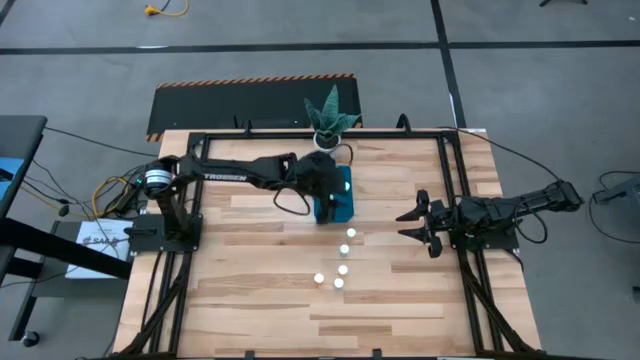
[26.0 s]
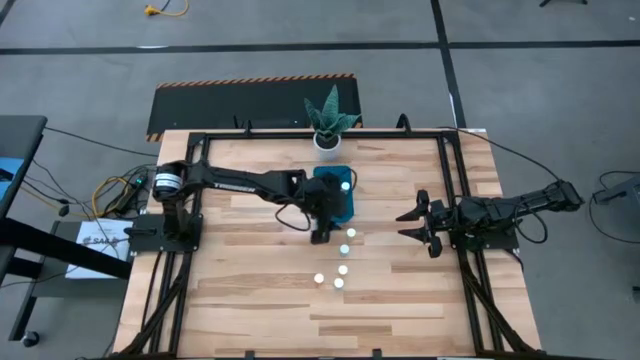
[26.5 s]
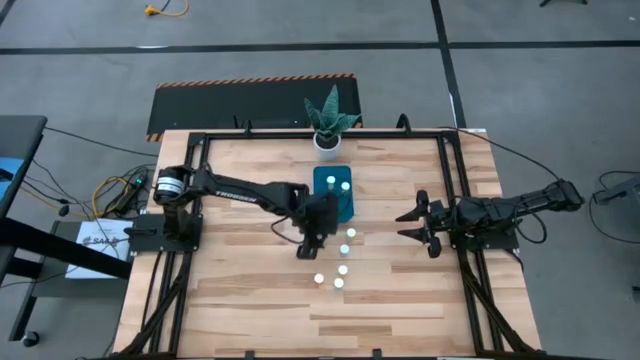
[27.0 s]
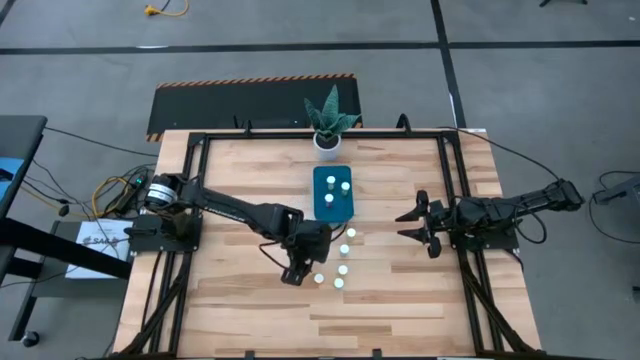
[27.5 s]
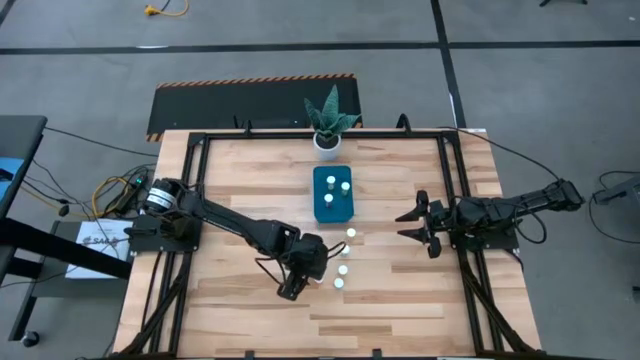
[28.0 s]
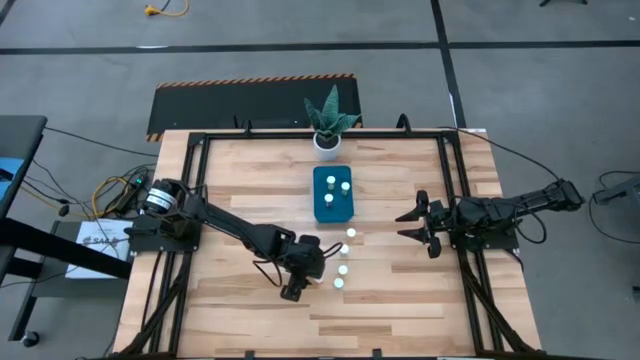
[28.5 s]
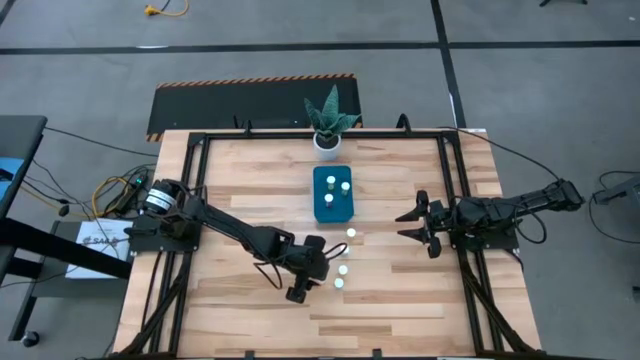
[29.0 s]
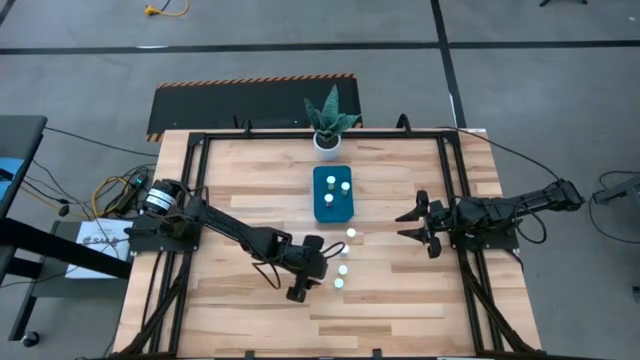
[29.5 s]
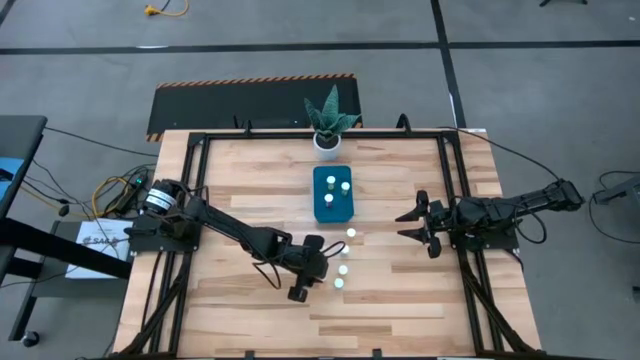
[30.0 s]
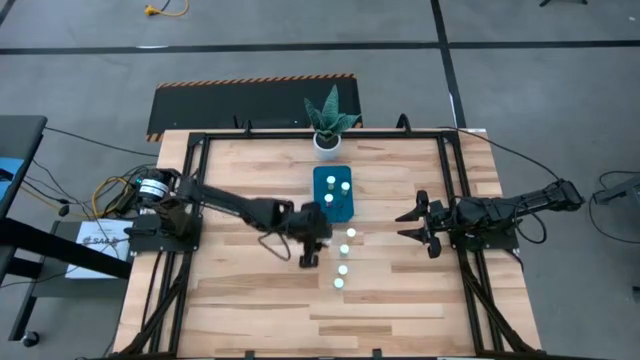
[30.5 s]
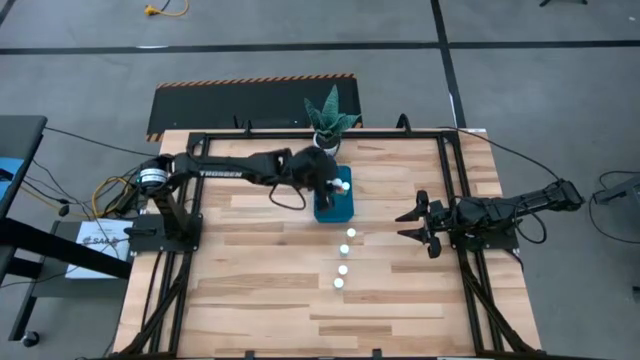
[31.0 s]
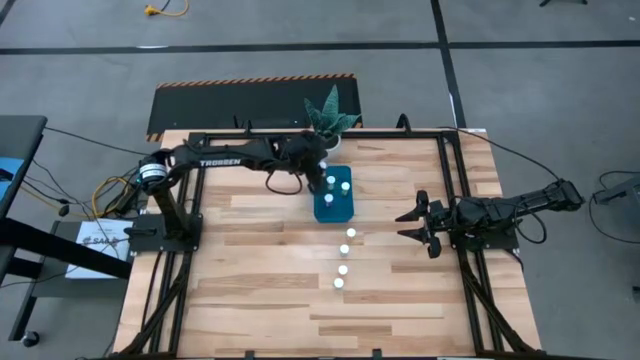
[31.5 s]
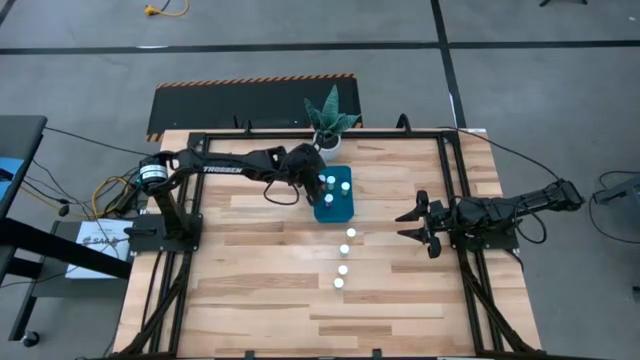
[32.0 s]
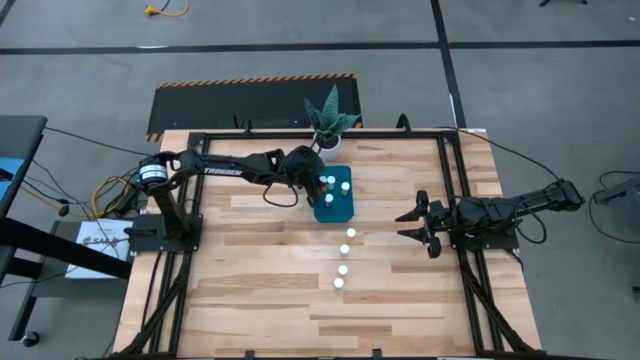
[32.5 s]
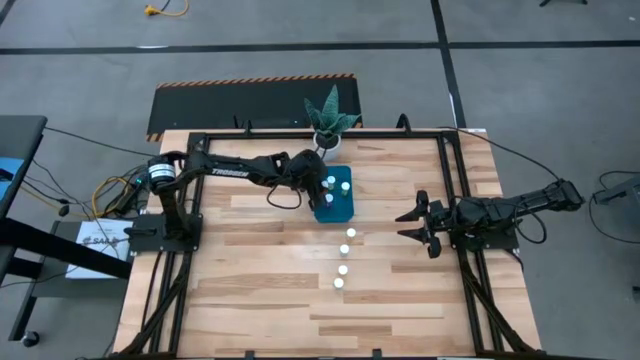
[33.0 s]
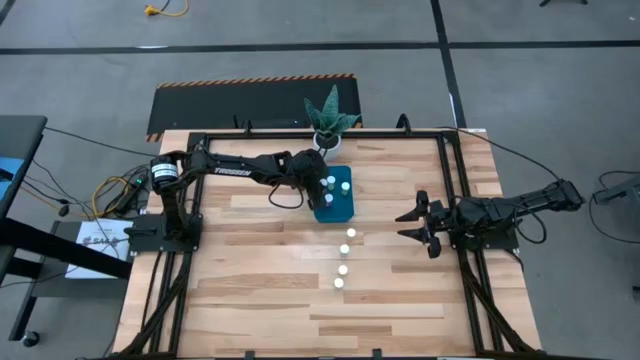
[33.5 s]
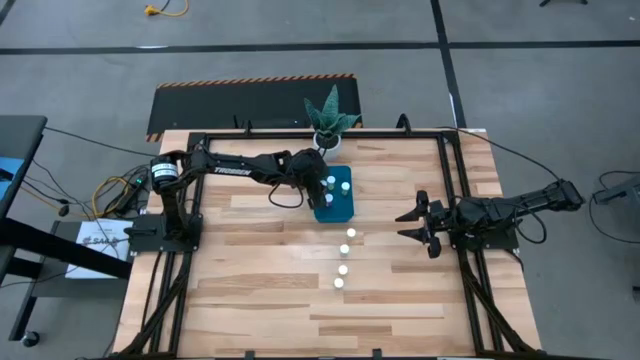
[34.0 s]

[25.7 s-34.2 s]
Task: Pick and place pill bottles into a basket
Put the orange pill bottle into the blue bin

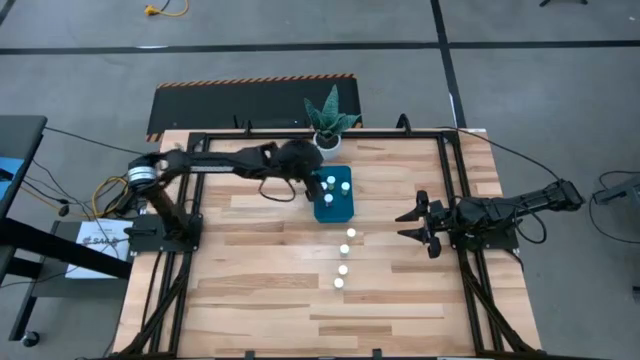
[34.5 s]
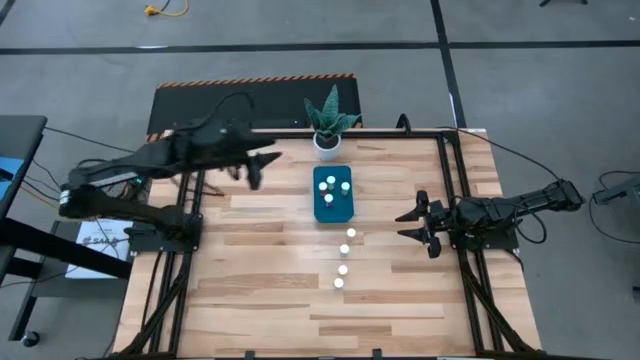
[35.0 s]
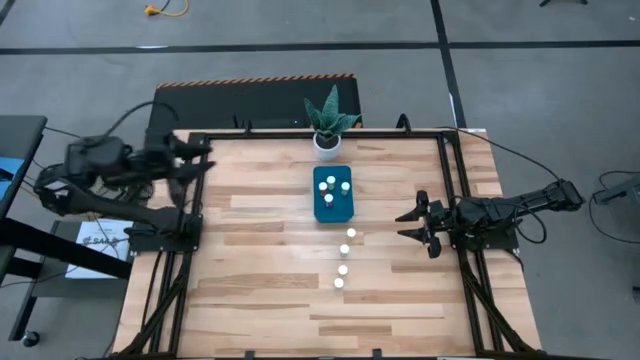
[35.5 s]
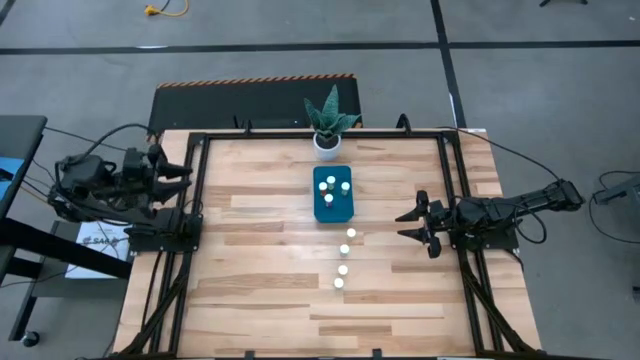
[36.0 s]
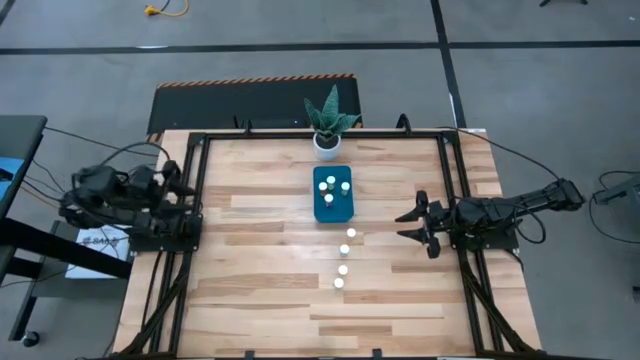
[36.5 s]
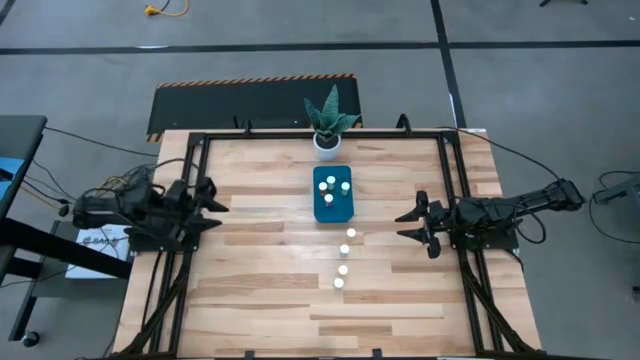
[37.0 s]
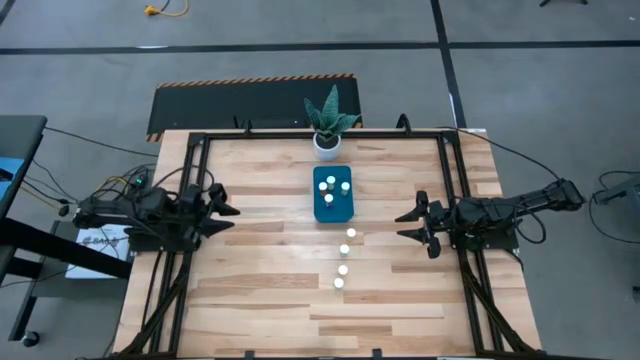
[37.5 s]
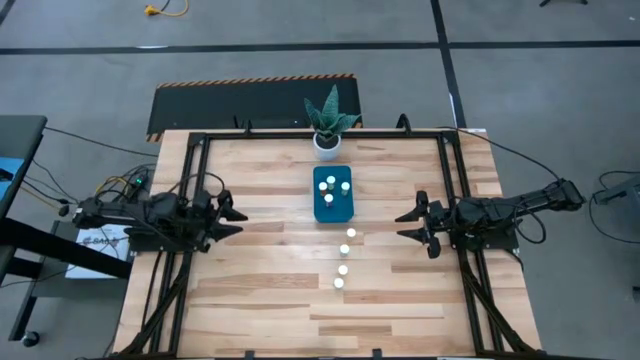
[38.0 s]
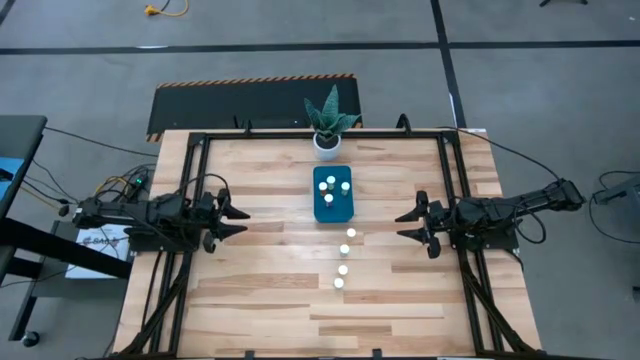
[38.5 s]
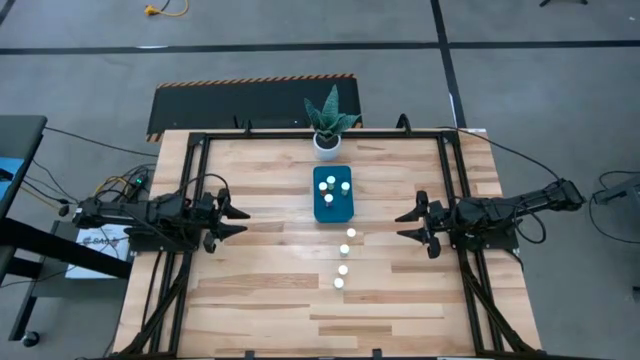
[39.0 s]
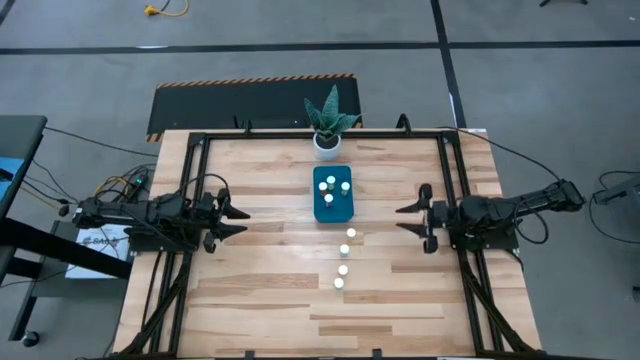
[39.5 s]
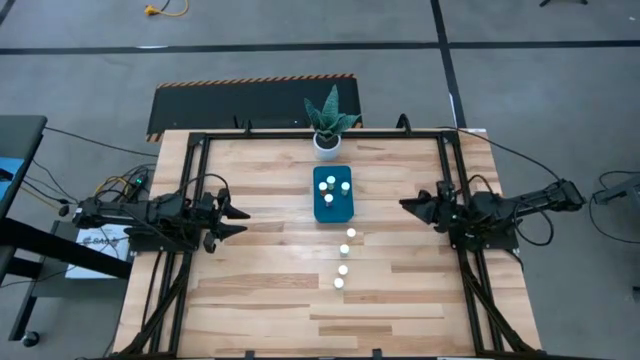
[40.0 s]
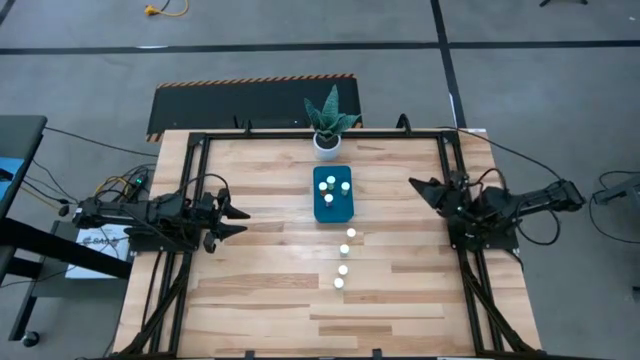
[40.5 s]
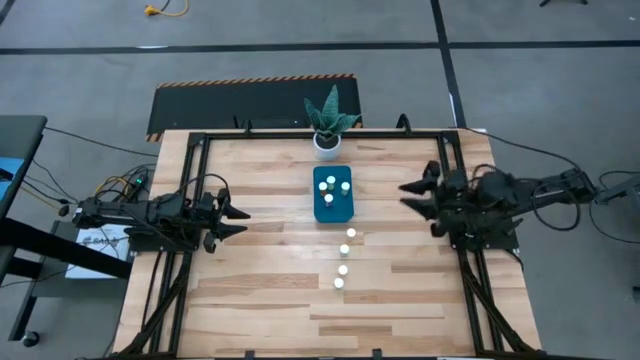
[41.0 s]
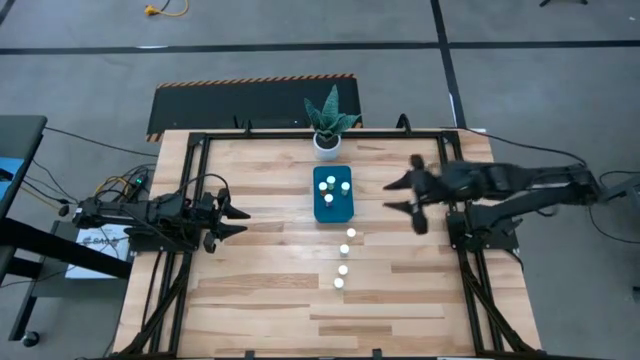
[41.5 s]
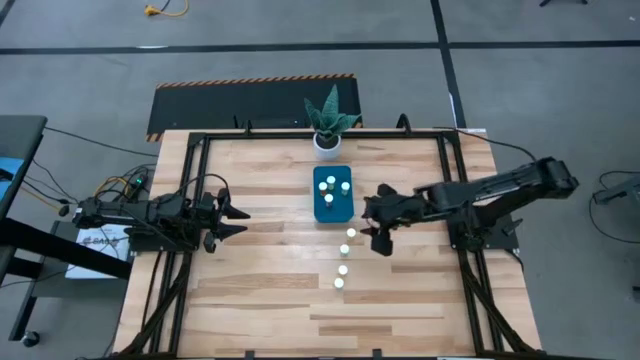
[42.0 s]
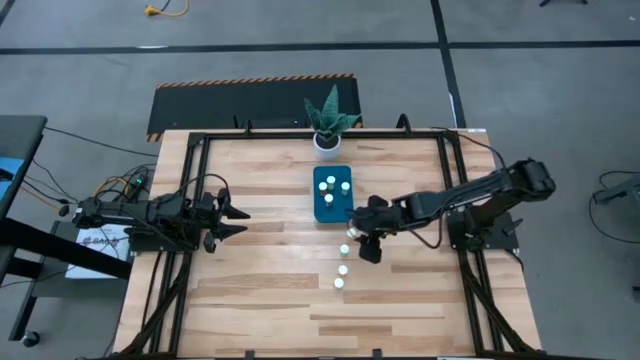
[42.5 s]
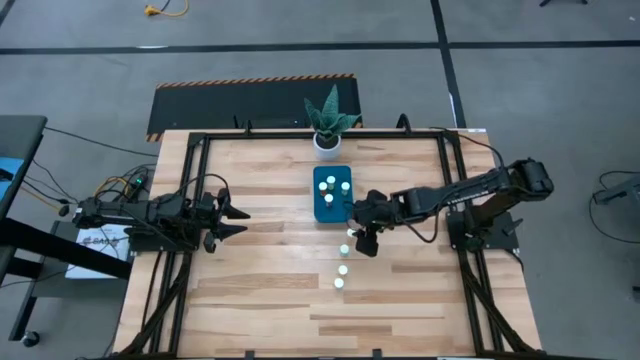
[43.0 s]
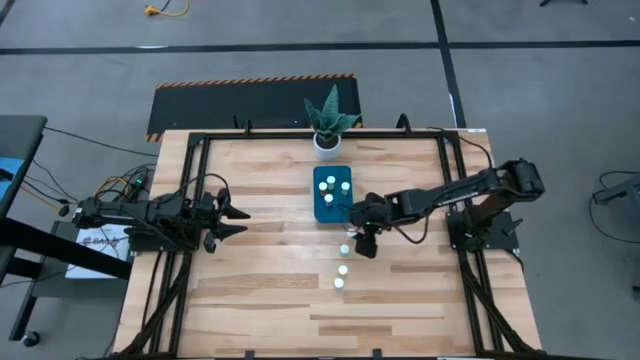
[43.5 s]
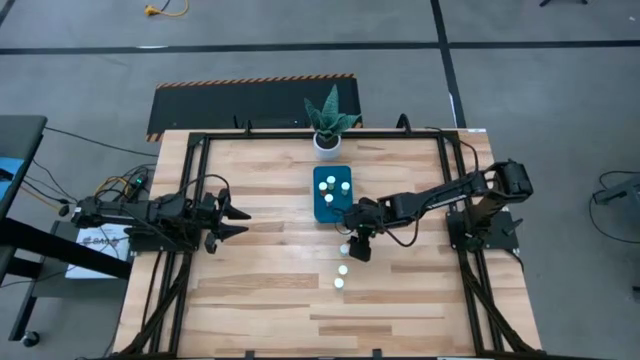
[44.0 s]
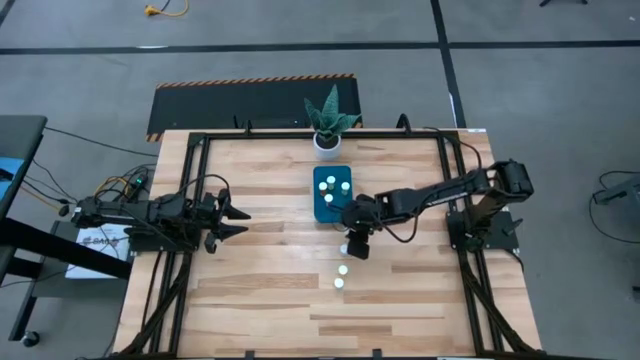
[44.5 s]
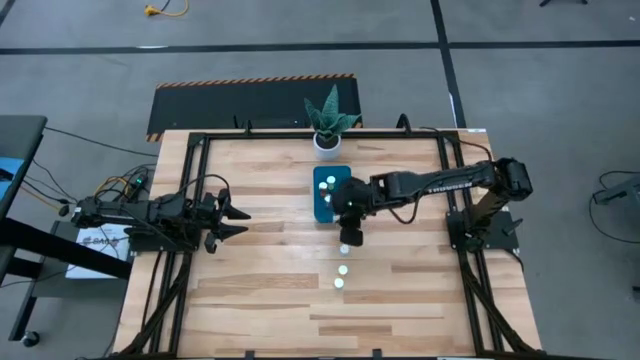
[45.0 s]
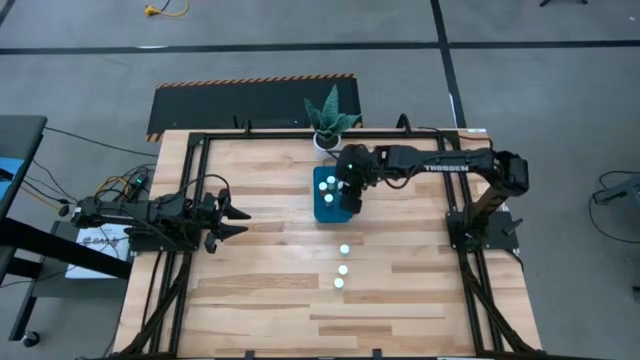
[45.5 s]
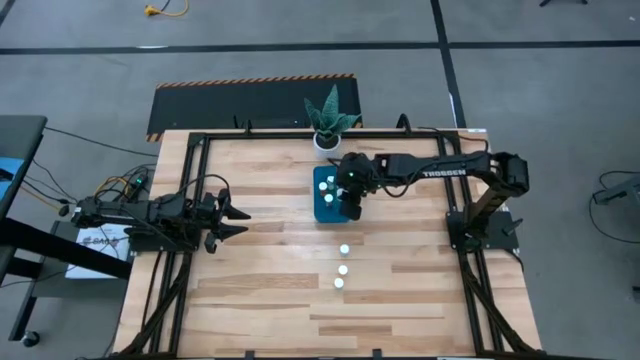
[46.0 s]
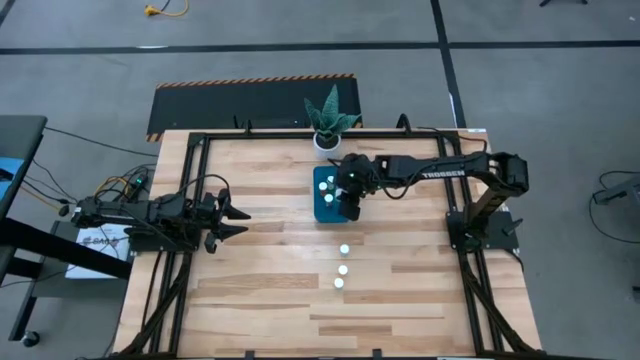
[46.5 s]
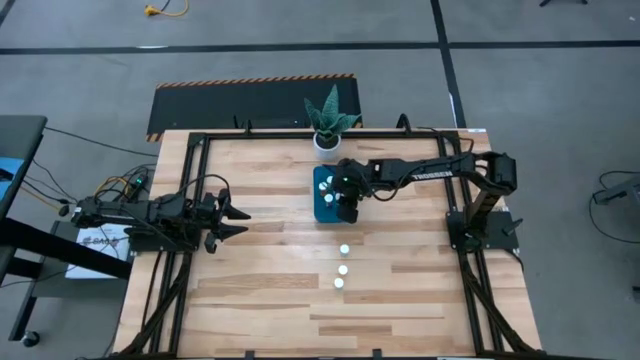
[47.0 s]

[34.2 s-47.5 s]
Put the yellow pill bottle into the blue bin

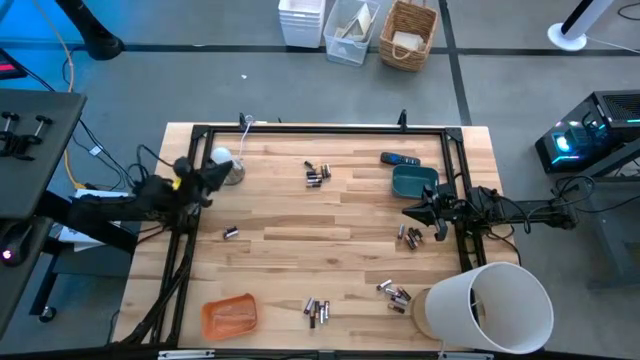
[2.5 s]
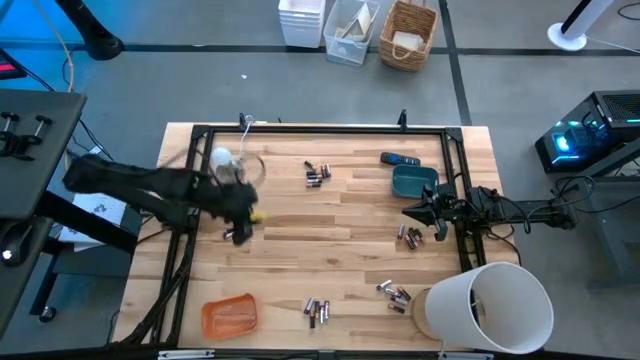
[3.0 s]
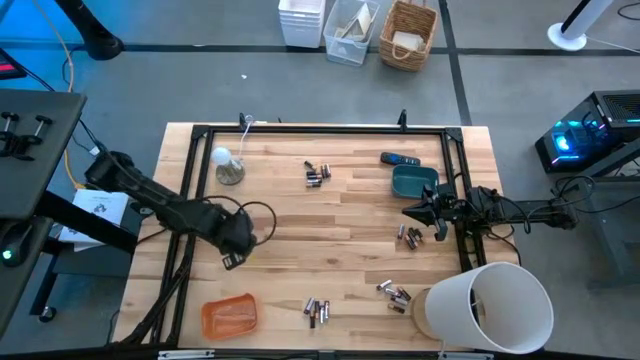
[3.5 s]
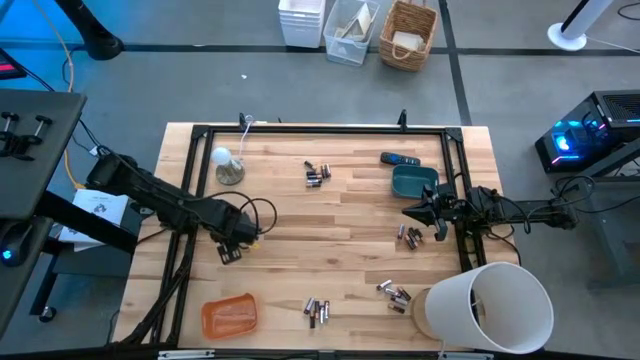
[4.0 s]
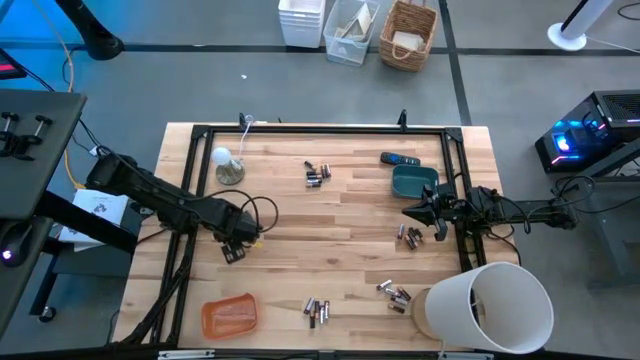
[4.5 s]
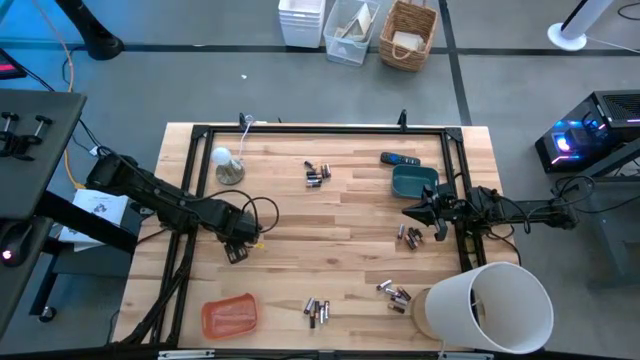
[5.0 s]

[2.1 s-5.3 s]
Task: Sort batteries
Put the silver battery into the orange bin
